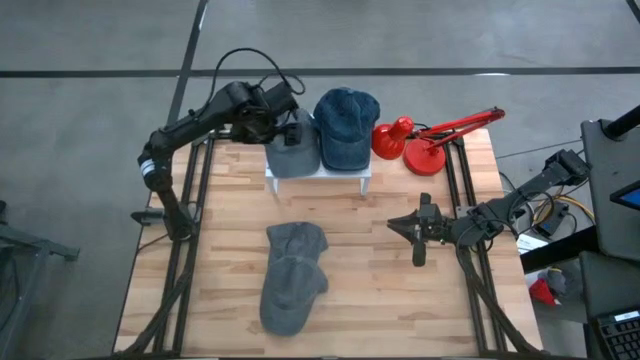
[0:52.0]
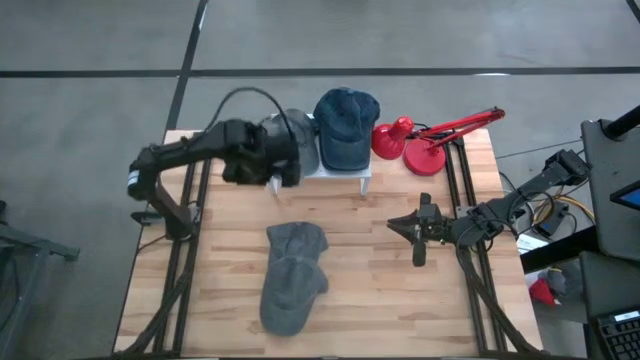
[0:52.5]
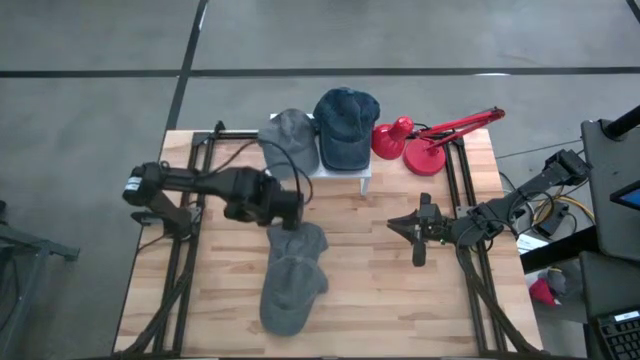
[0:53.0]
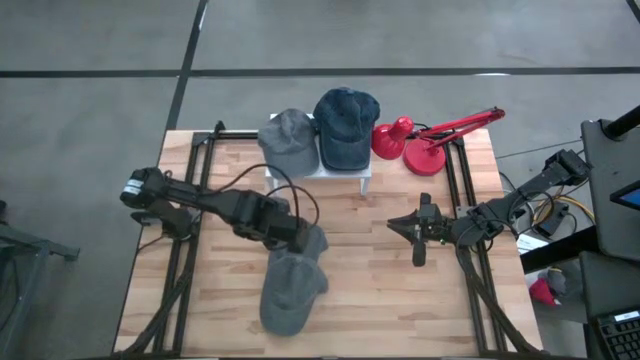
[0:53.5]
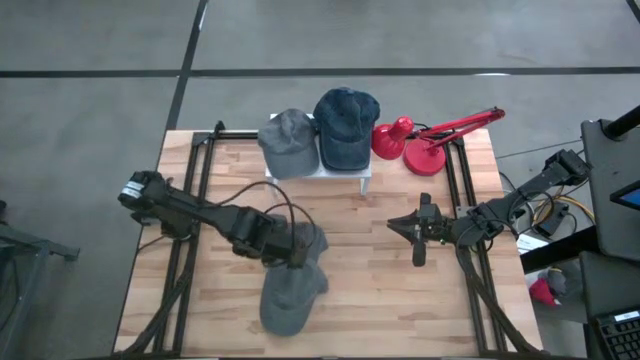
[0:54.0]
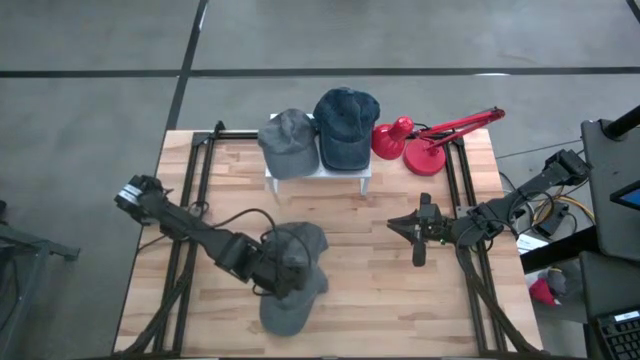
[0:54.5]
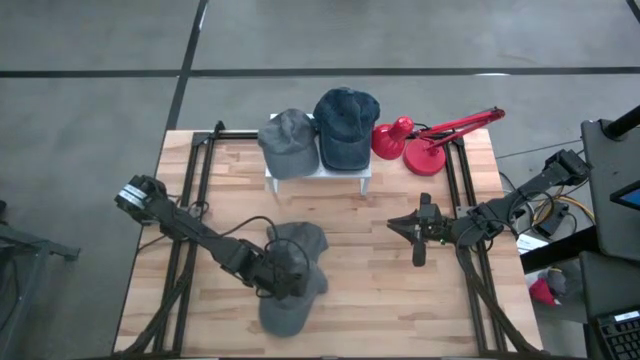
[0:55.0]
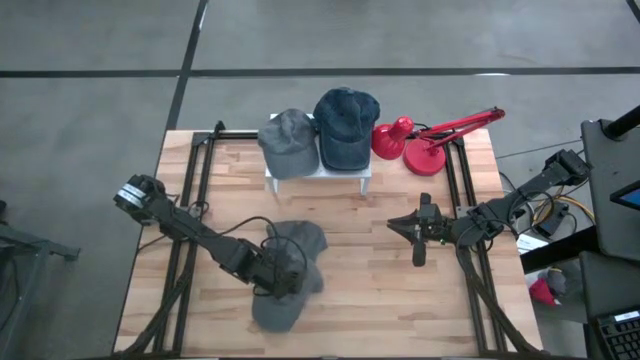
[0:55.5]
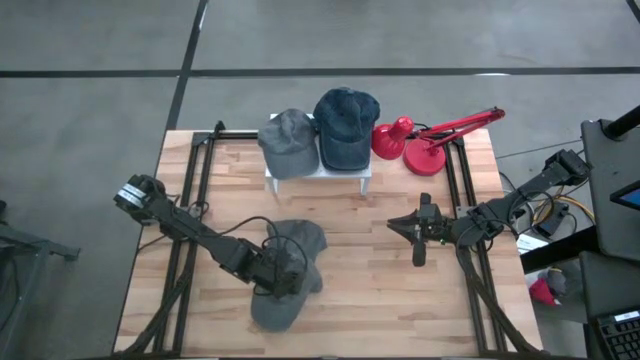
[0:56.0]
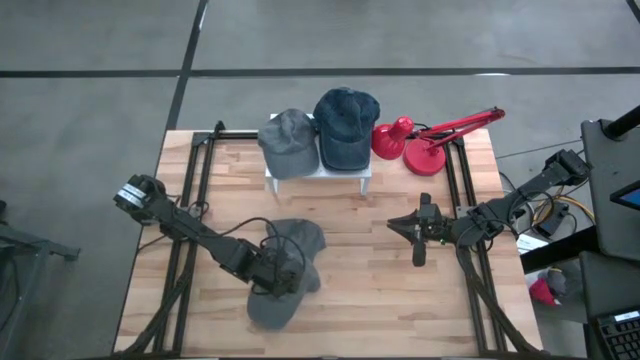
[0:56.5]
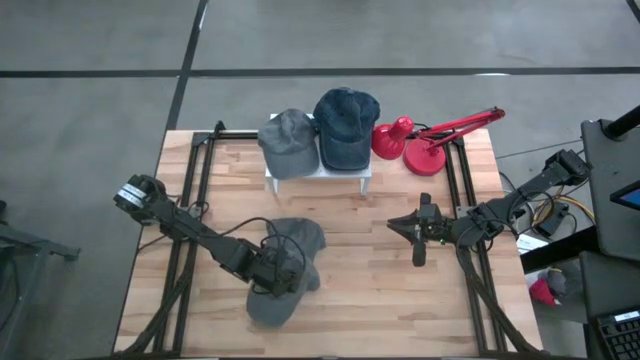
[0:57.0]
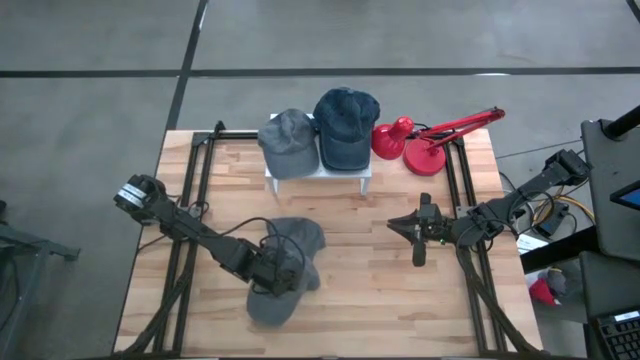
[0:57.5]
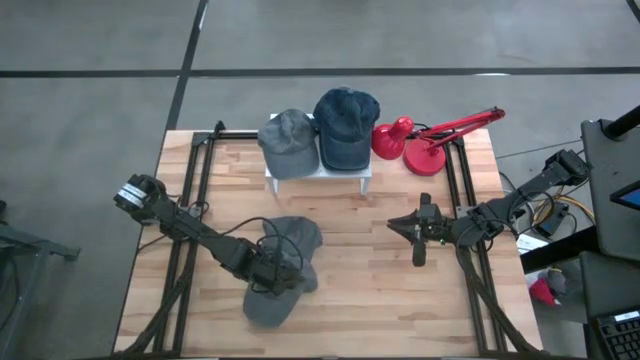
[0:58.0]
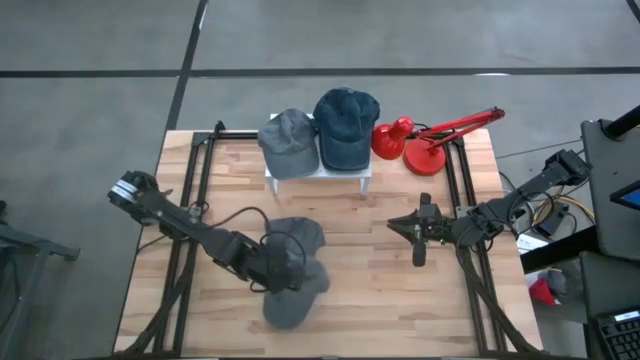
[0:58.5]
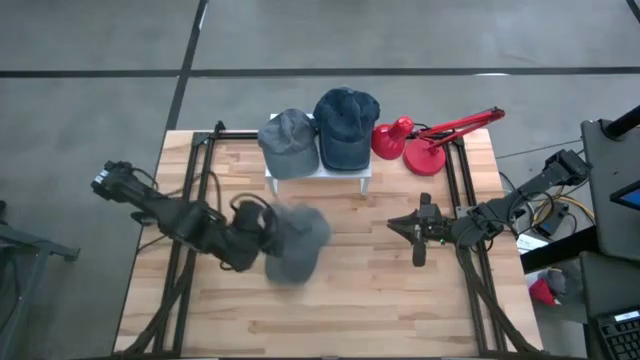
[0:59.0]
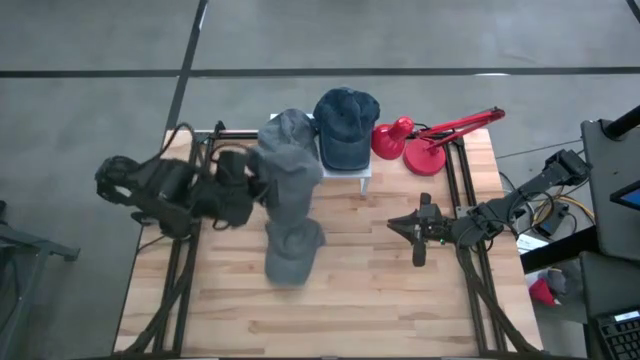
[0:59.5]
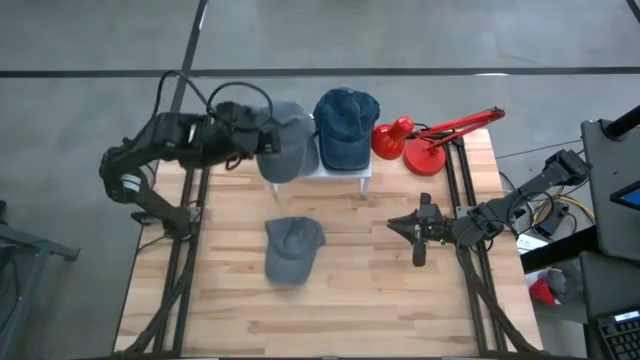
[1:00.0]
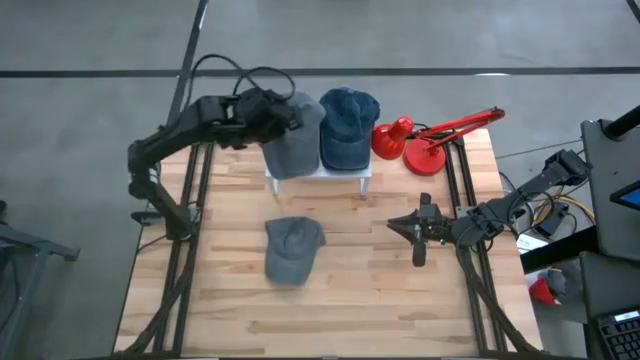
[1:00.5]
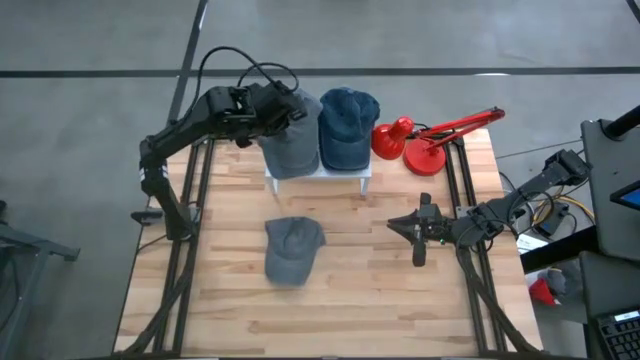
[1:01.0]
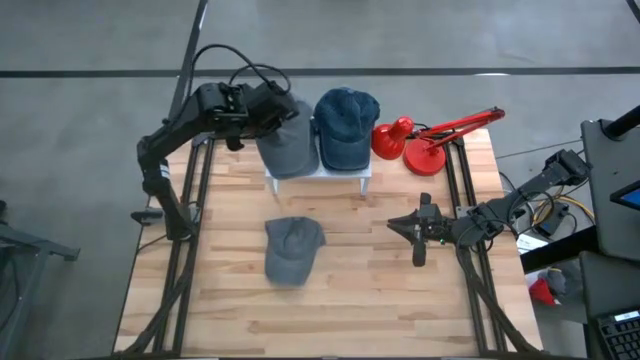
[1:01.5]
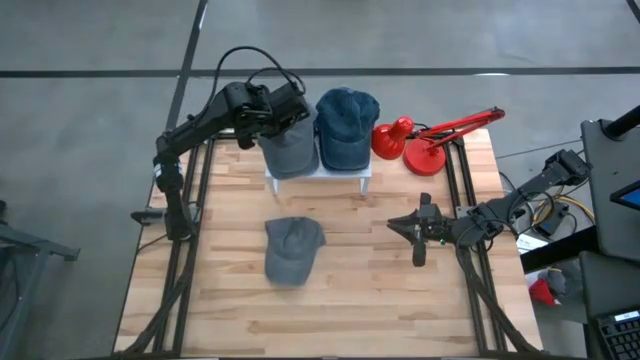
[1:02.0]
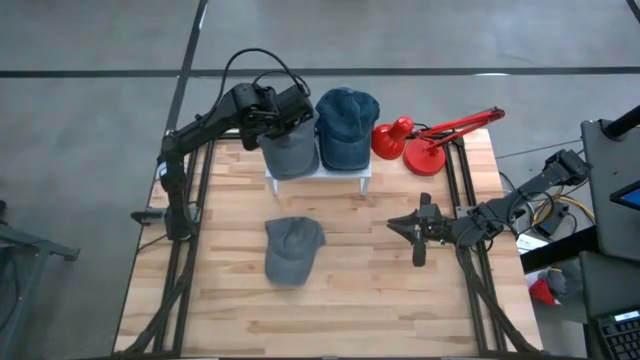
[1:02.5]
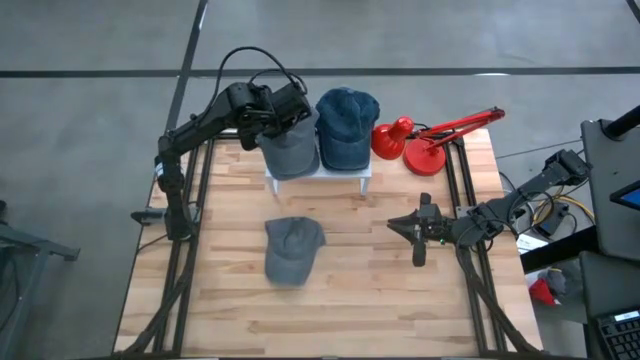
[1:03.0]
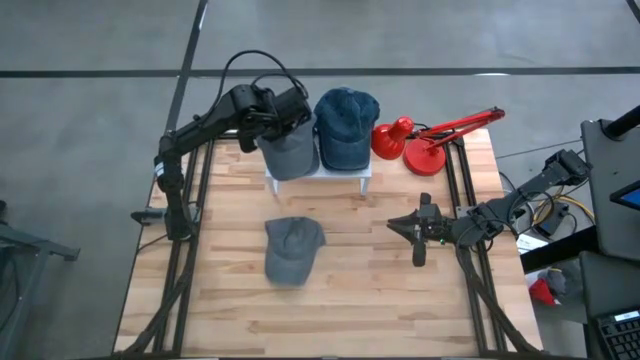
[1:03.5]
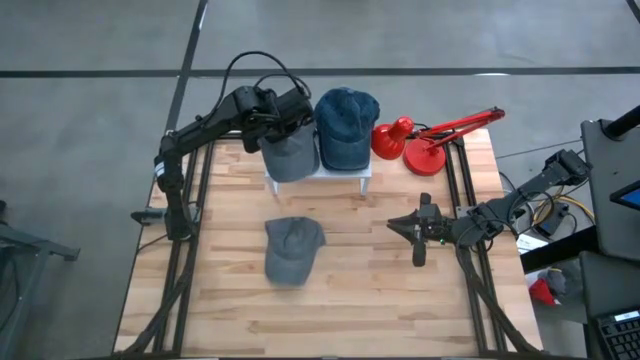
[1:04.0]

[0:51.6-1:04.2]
Task: Pick & Place hat
Stack the bottom gray cap on the gray cap

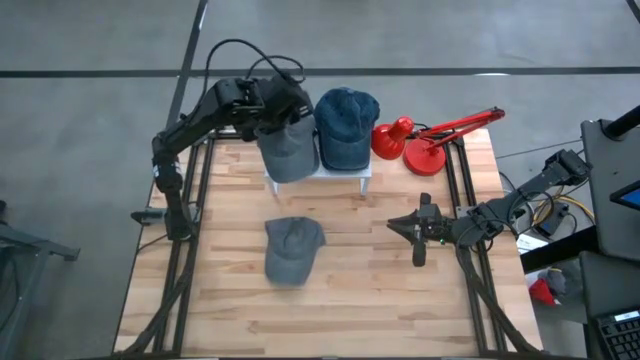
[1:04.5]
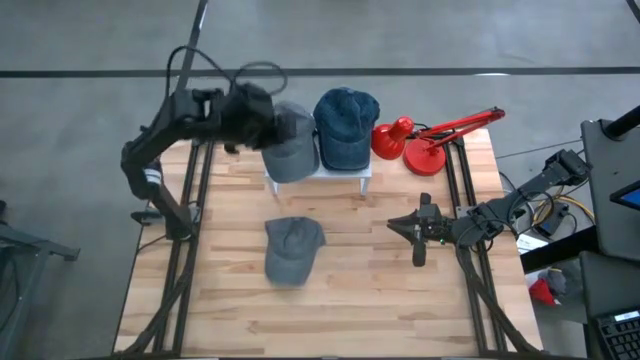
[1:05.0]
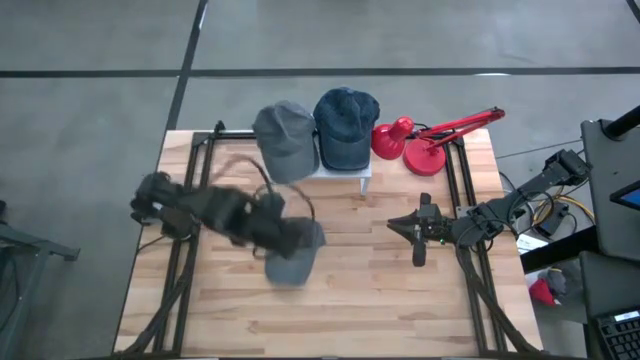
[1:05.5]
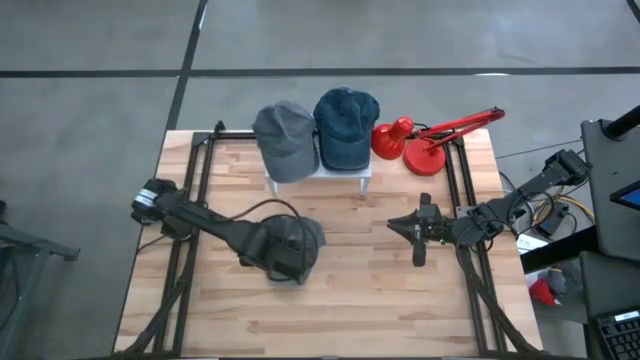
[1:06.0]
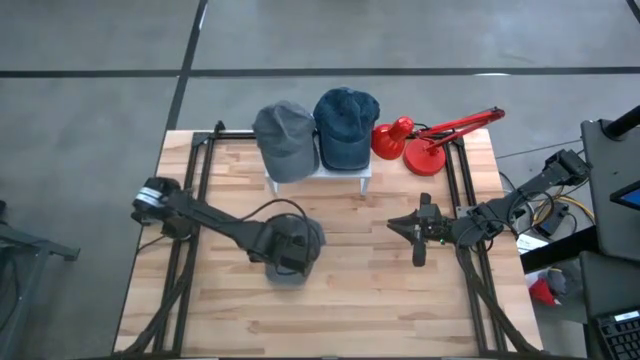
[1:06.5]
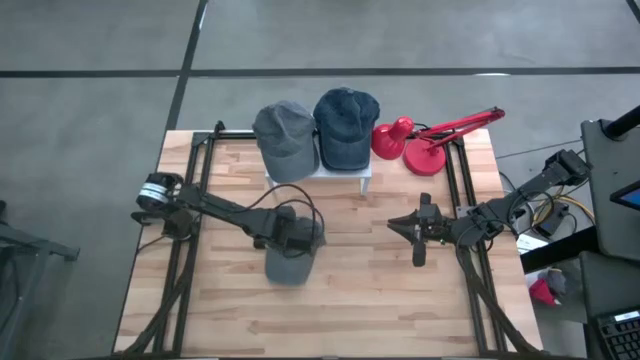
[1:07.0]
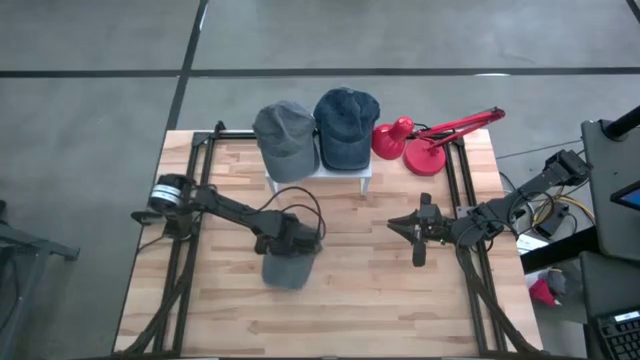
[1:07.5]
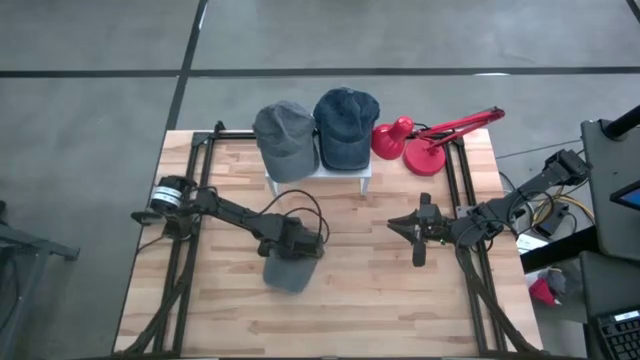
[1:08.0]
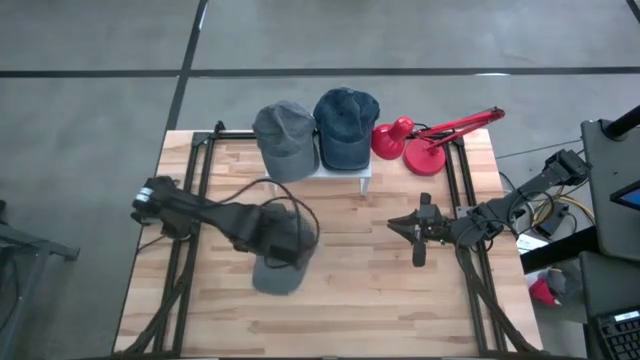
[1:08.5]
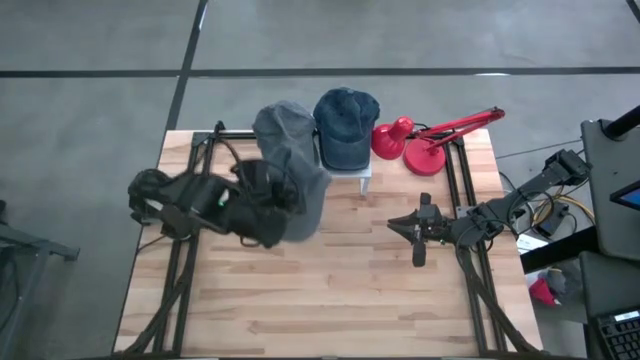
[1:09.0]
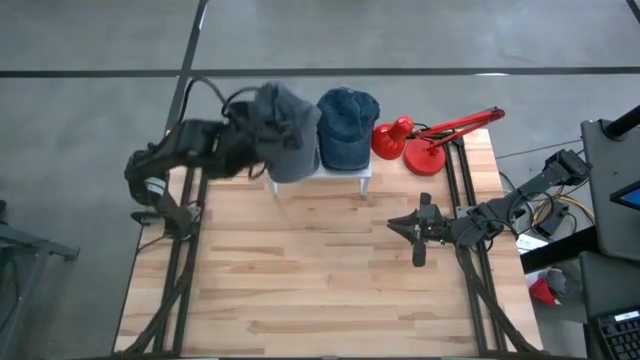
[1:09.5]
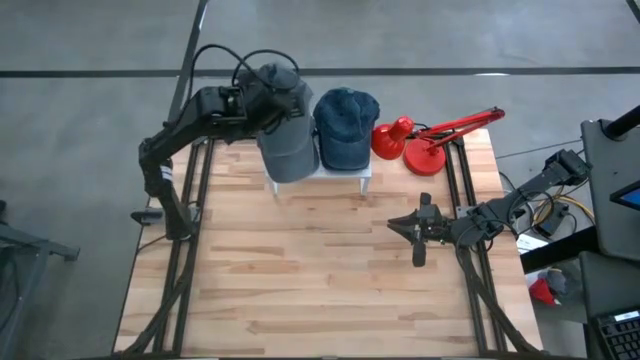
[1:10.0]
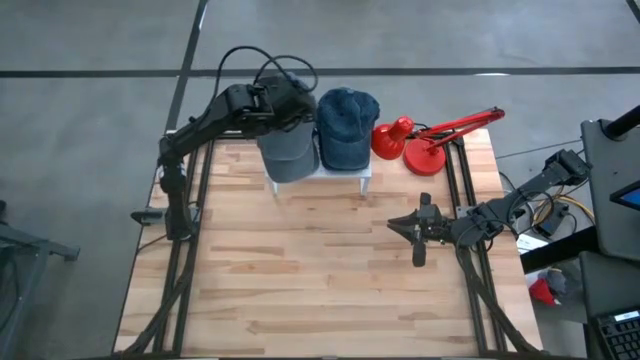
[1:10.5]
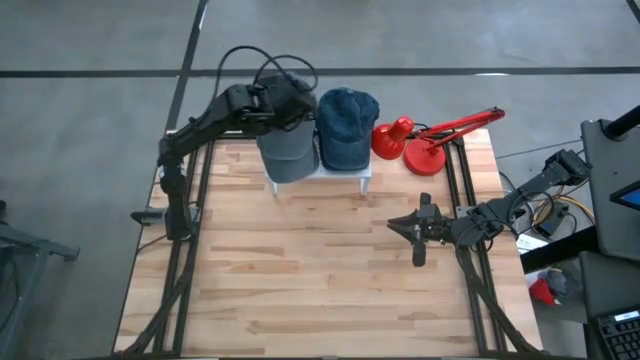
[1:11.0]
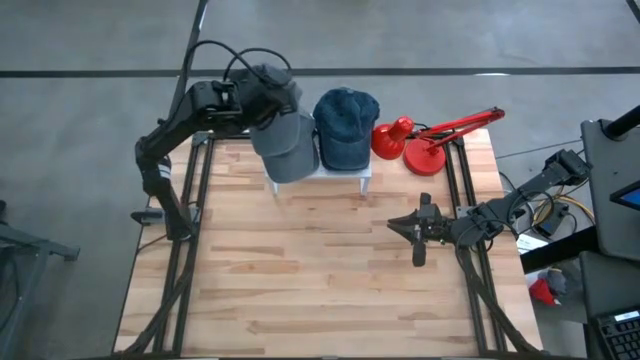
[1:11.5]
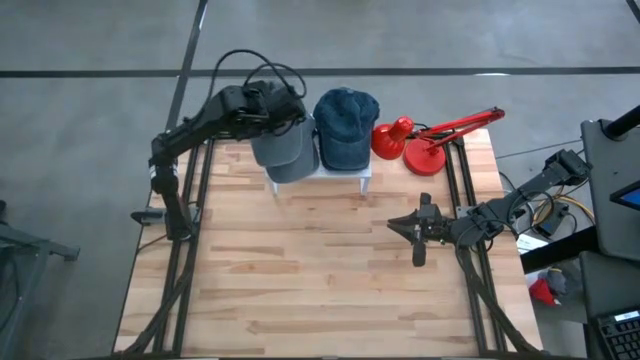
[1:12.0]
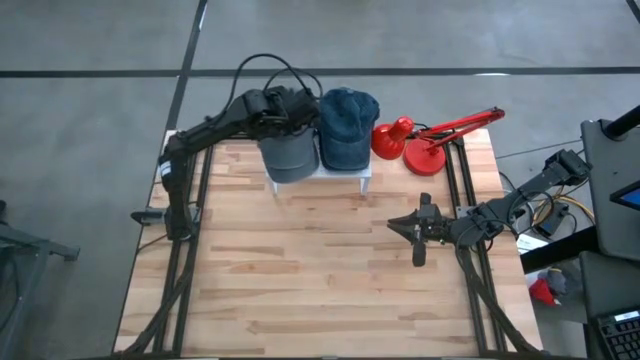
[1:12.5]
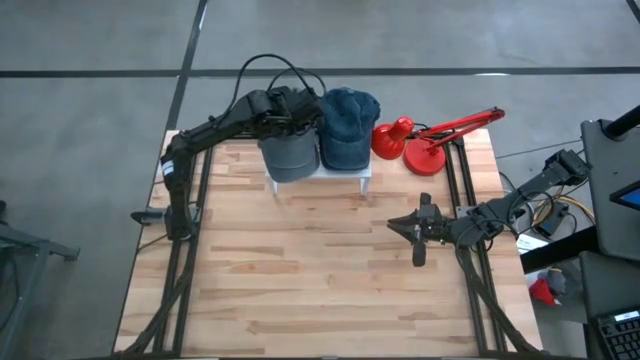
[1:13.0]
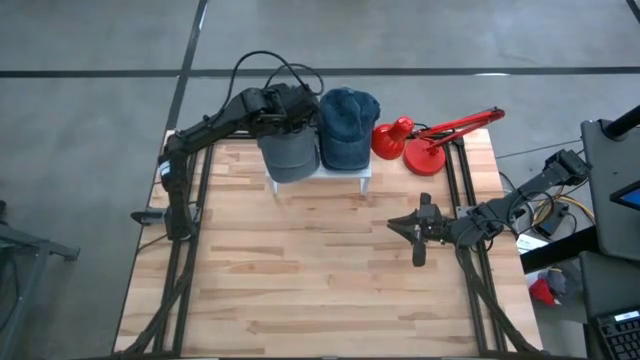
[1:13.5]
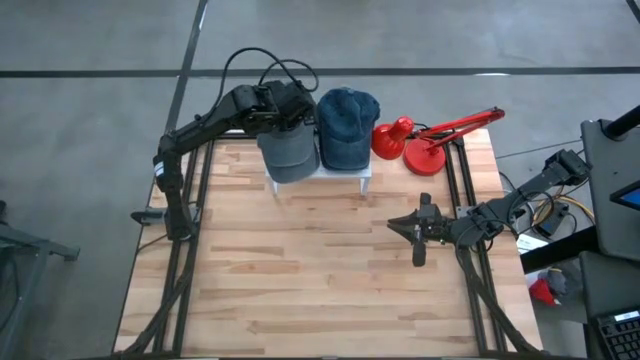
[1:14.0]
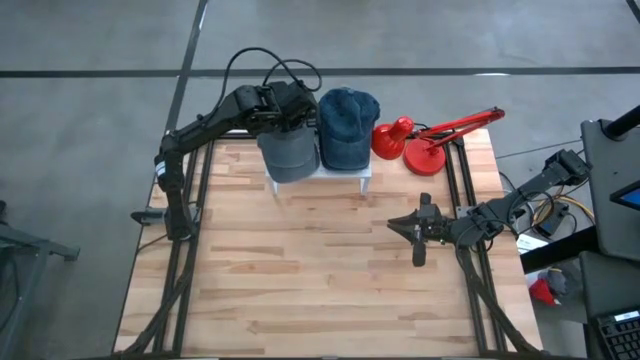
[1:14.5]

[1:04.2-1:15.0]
Stack the gray cap on the gray cap
